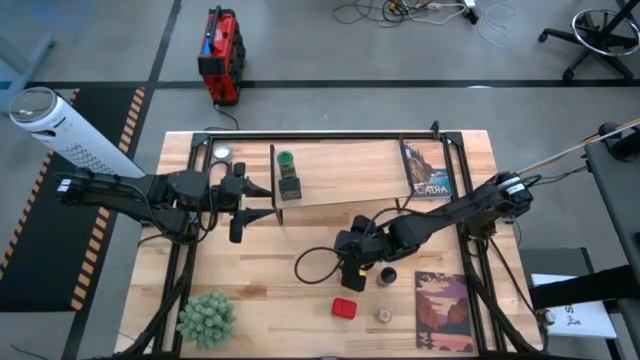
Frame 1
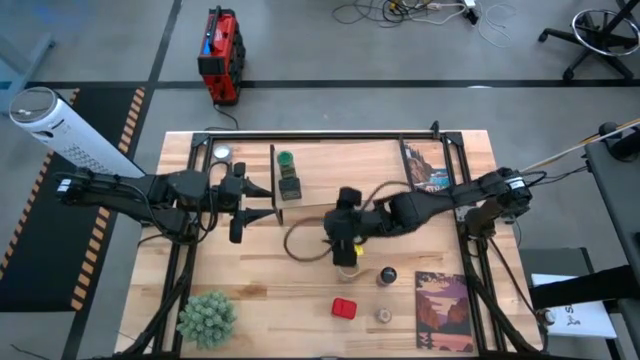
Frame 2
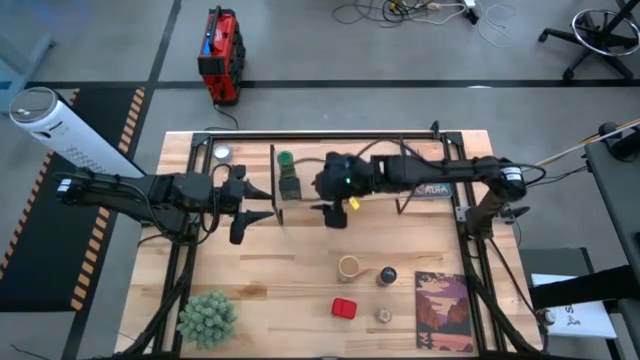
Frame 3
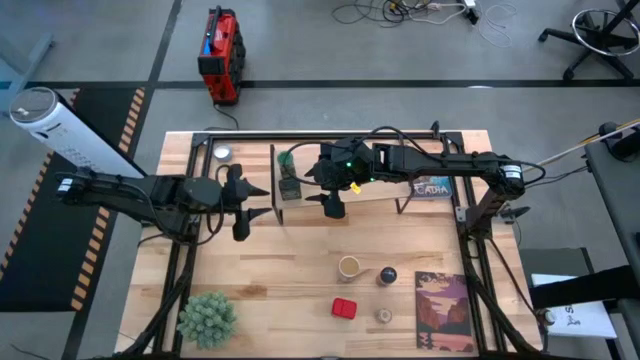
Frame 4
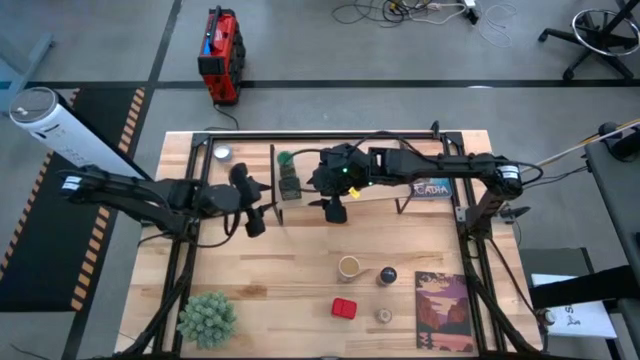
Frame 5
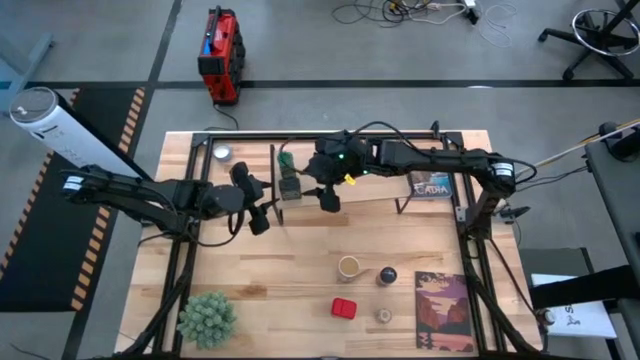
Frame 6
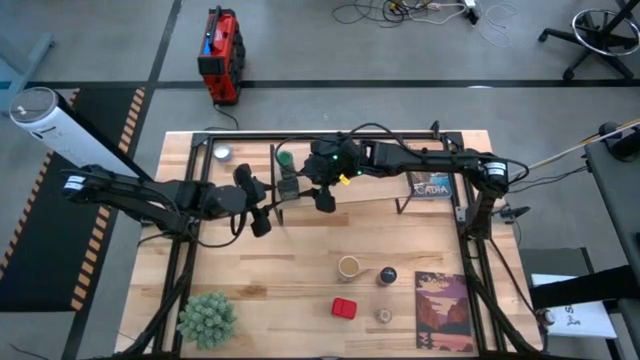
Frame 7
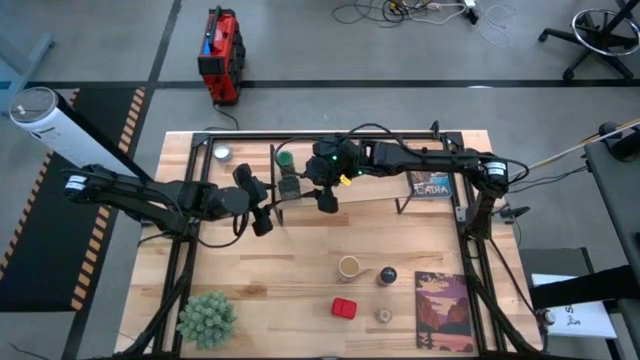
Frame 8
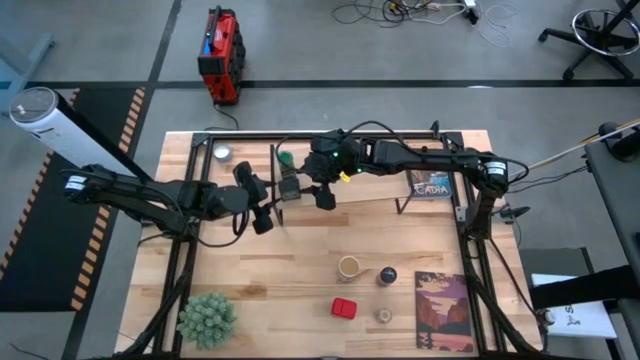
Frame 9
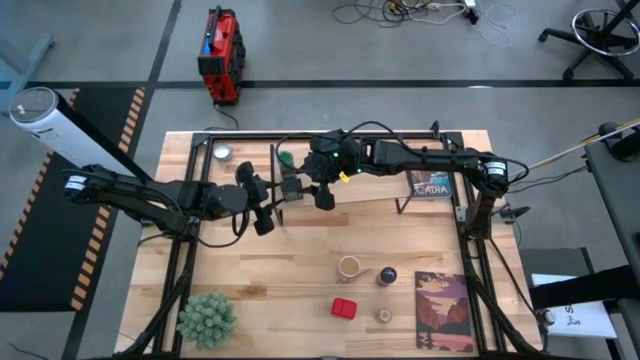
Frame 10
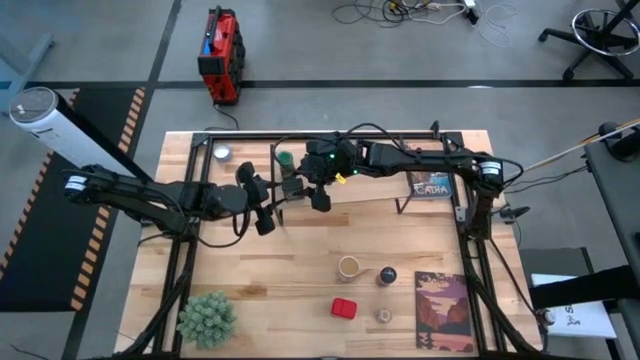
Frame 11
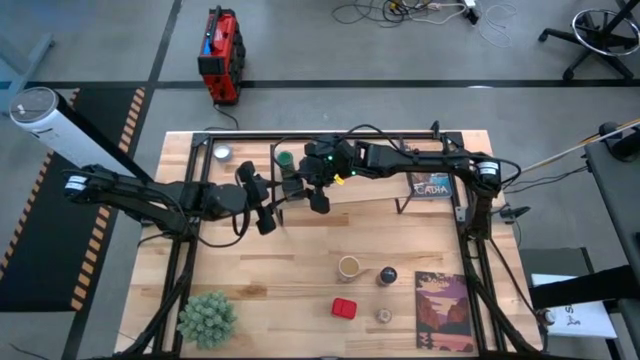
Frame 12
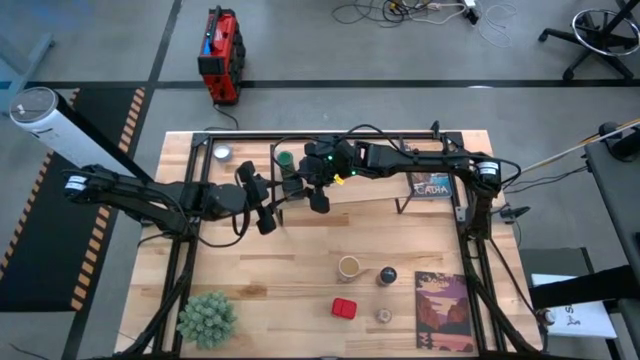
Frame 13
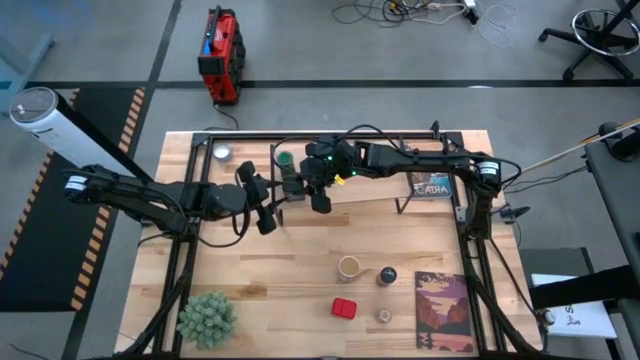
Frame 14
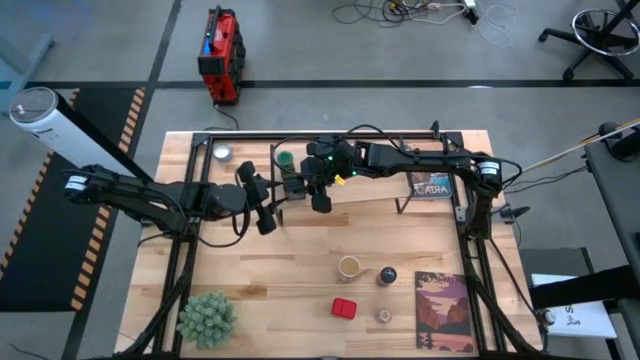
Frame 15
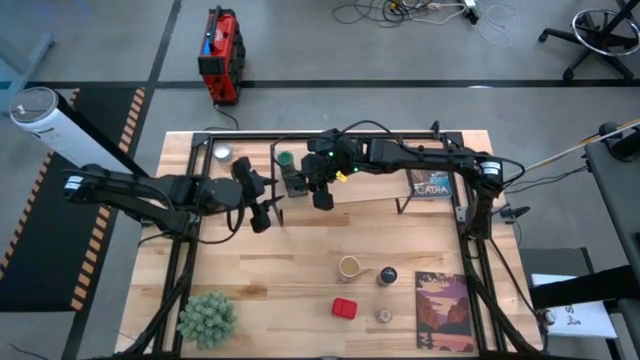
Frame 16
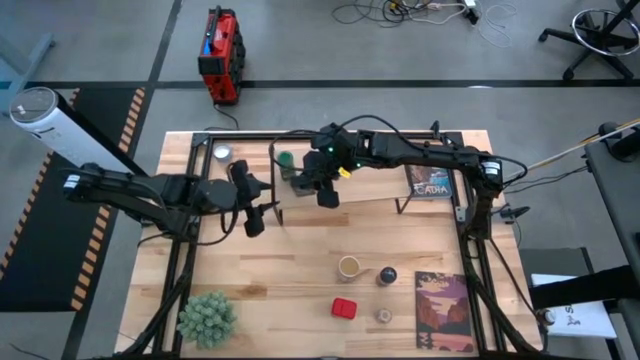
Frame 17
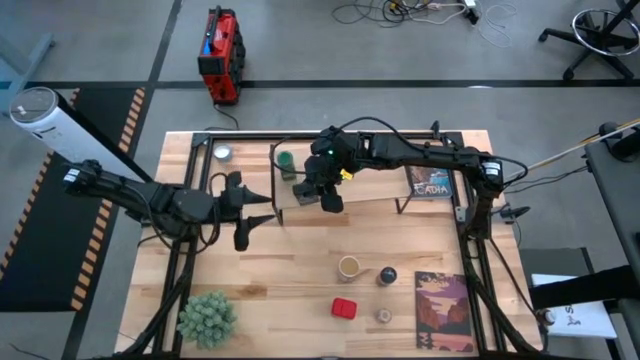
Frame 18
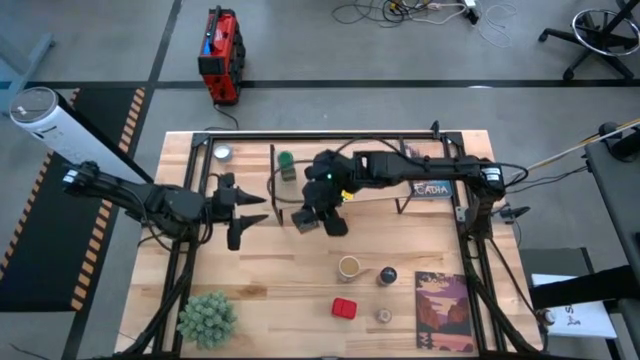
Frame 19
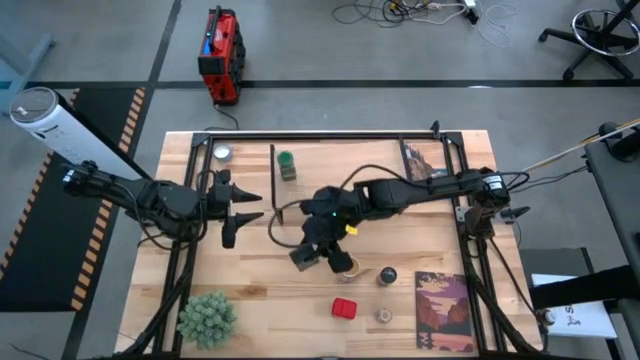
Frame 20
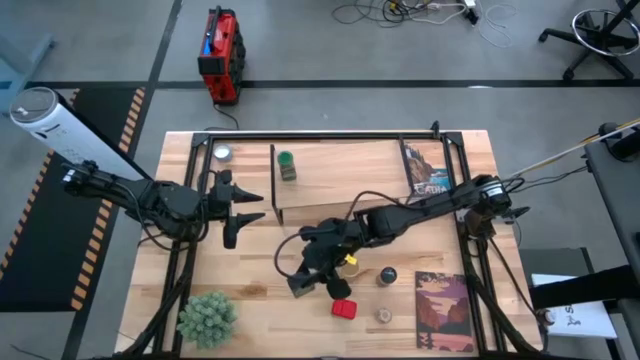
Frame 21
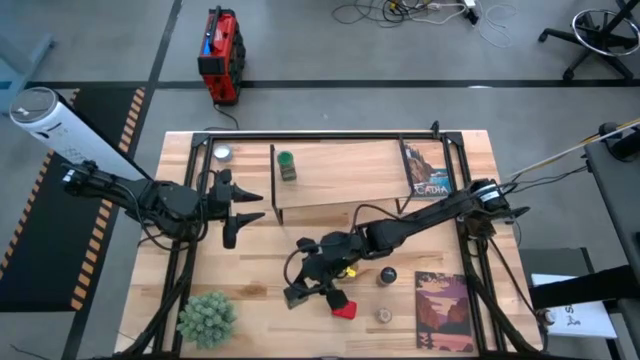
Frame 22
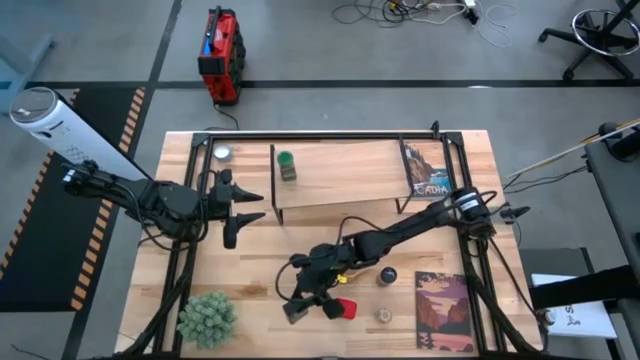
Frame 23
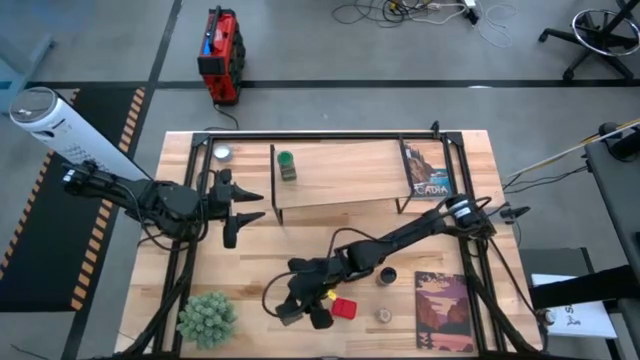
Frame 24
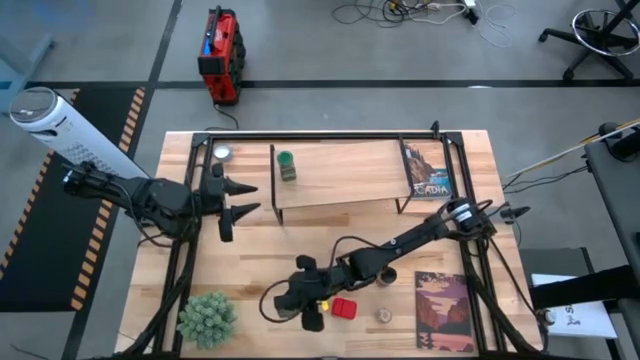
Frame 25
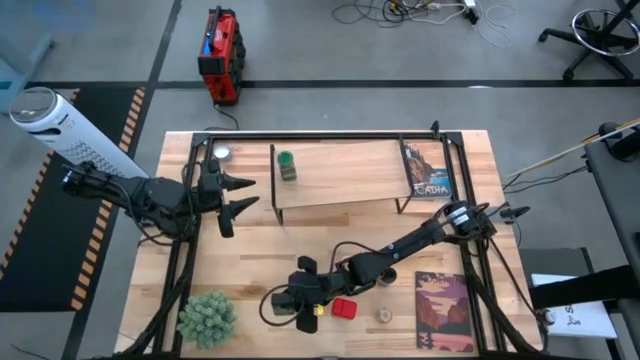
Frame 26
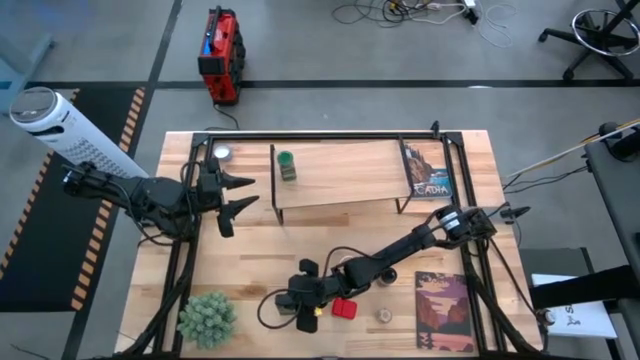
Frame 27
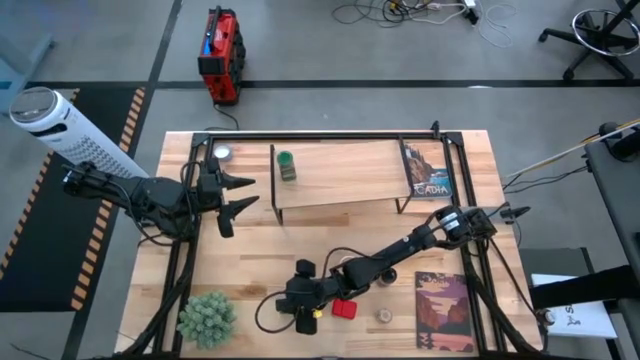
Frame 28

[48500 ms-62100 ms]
Task: Shelf spices
Remove the black seasoning can from the shelf

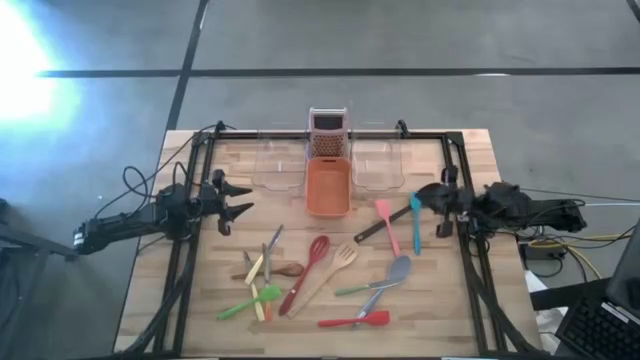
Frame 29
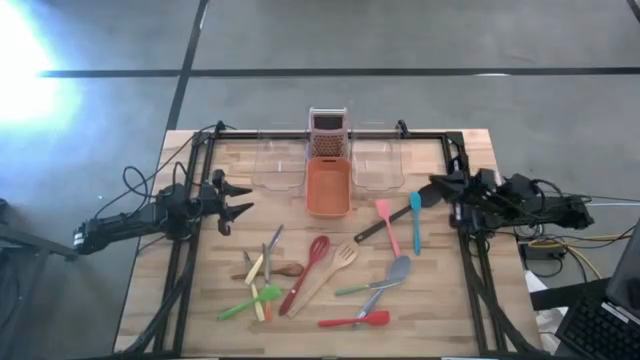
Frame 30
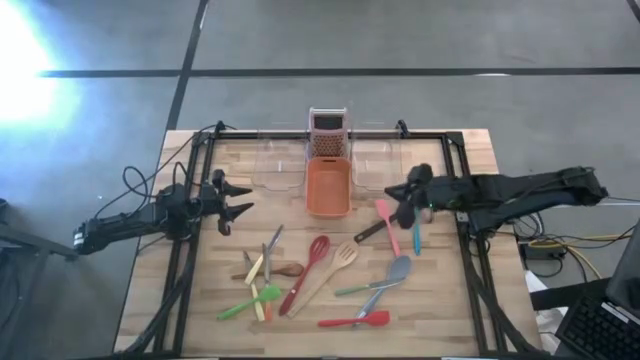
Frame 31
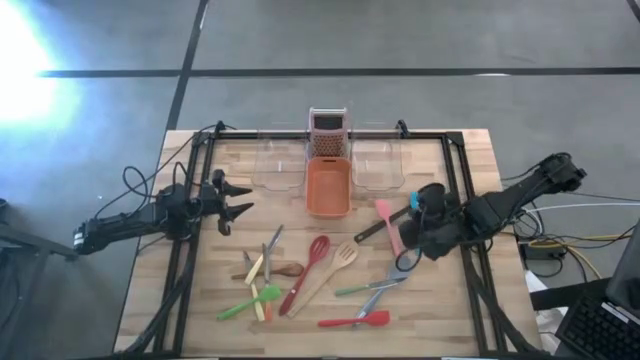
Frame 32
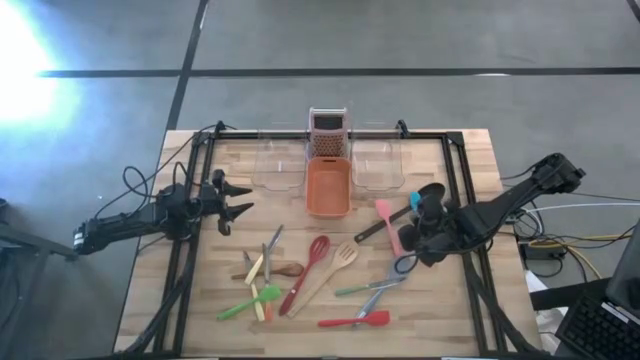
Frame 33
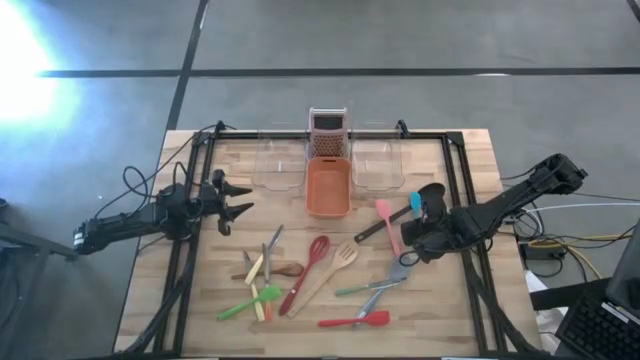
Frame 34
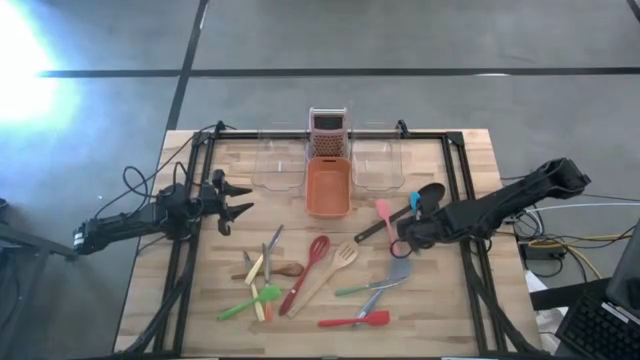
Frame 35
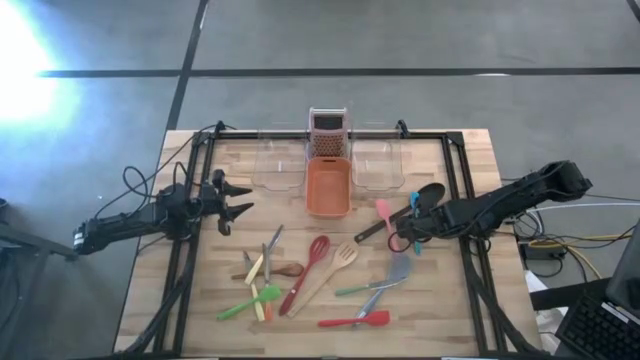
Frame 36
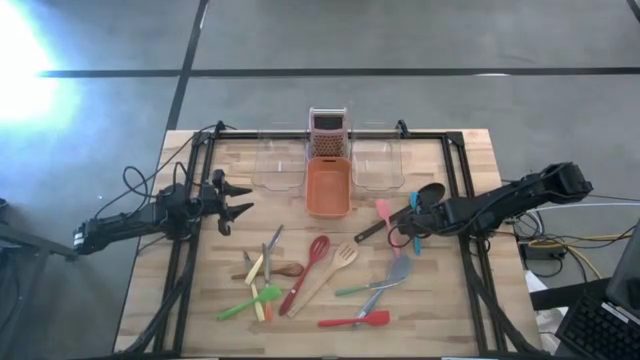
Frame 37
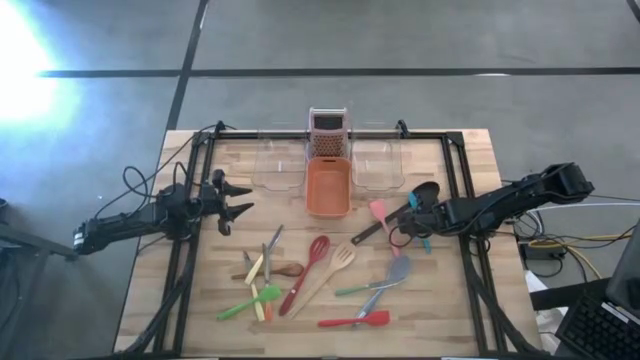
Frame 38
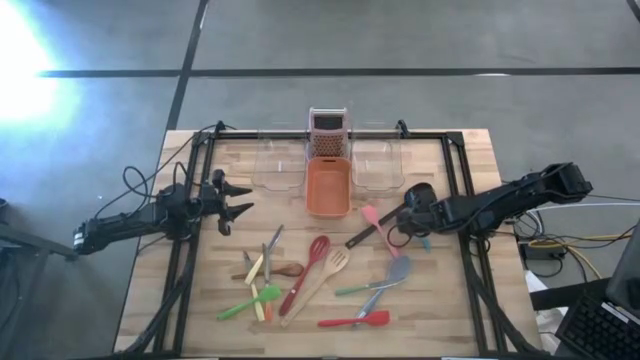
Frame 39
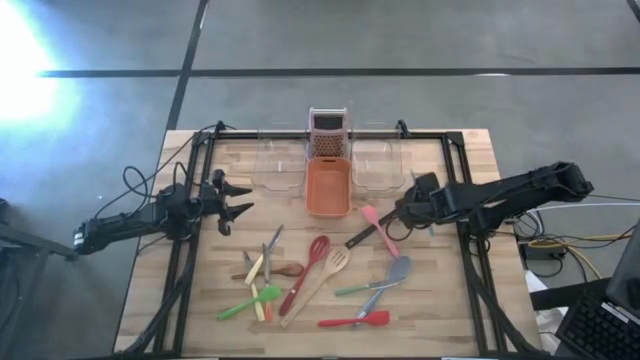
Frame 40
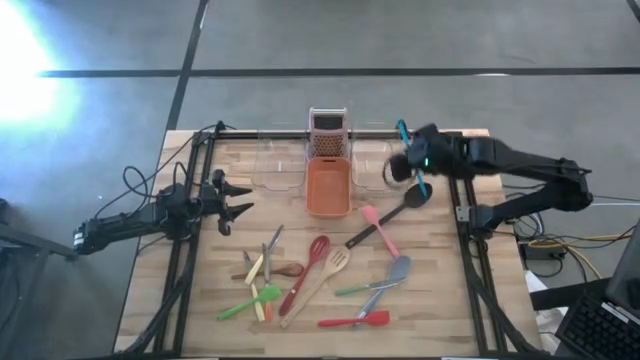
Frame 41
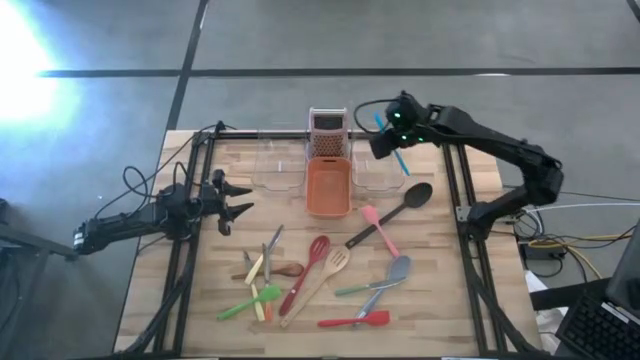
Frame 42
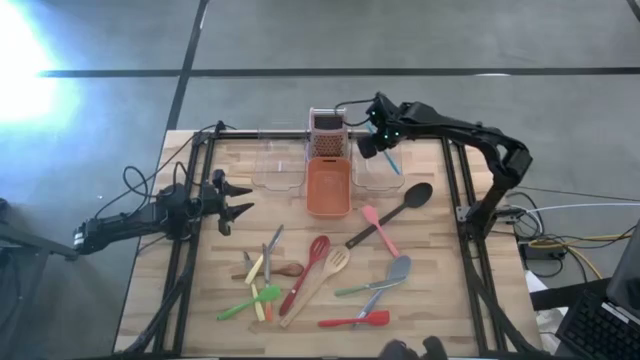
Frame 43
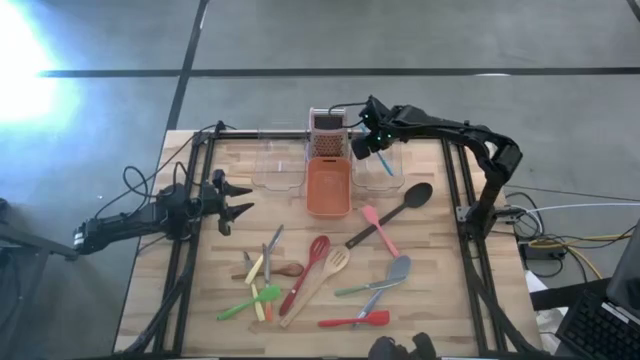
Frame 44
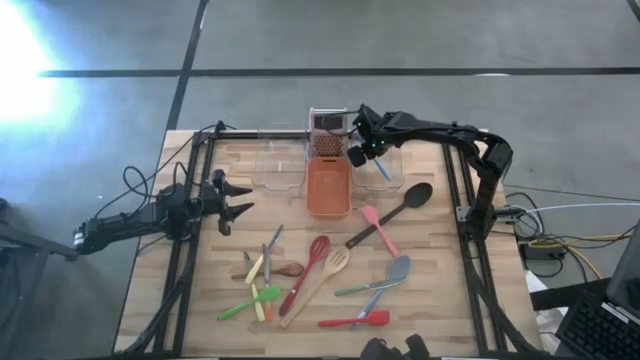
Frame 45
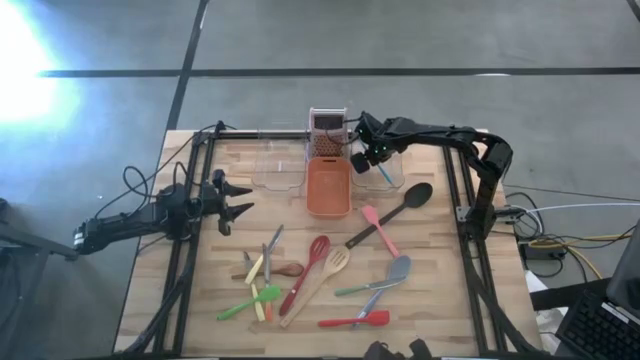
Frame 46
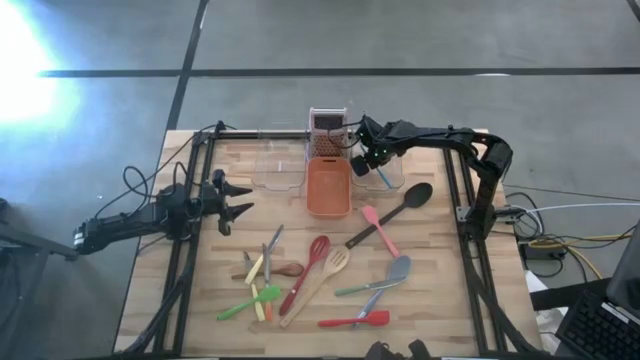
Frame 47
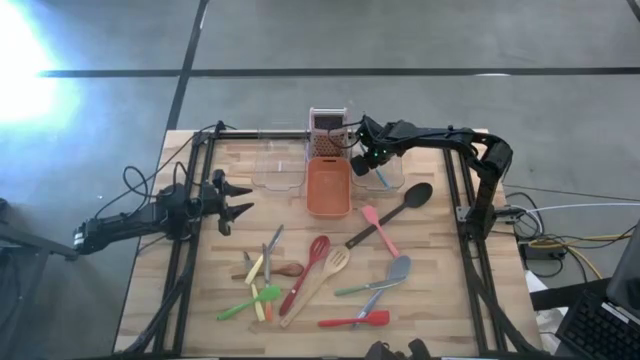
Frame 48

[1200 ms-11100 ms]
Task: Pick & Place Kitchen Items
Put the blue spatula into the right transparent bin
